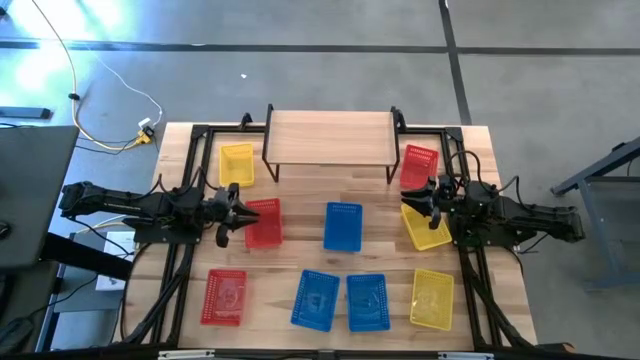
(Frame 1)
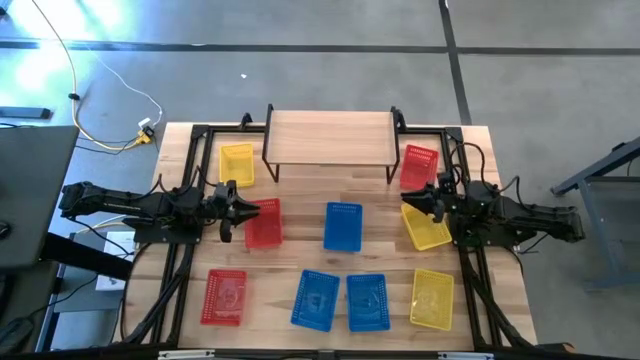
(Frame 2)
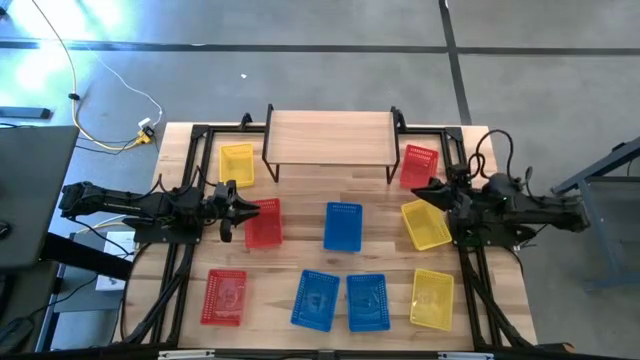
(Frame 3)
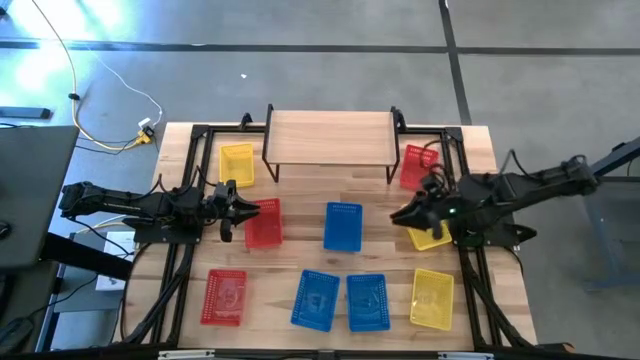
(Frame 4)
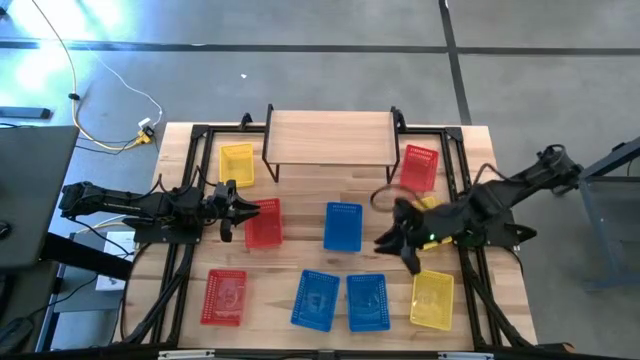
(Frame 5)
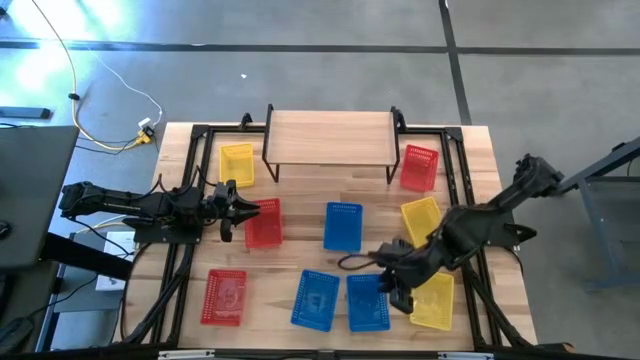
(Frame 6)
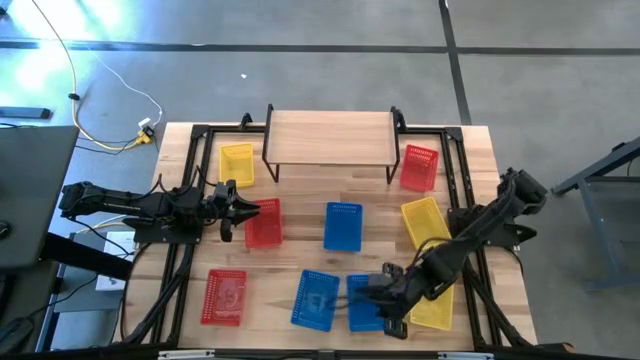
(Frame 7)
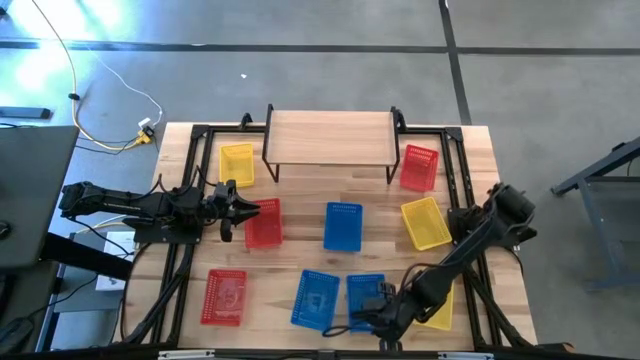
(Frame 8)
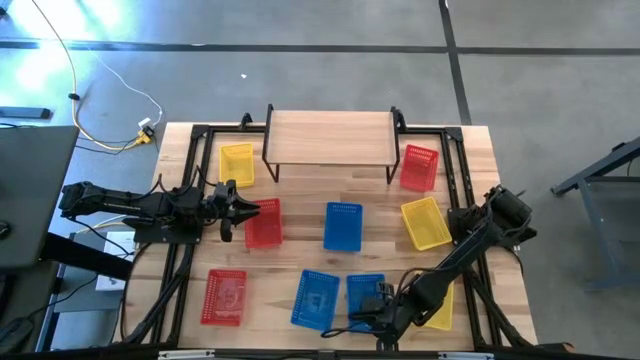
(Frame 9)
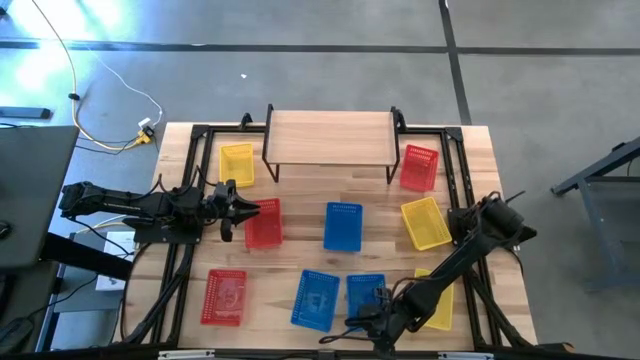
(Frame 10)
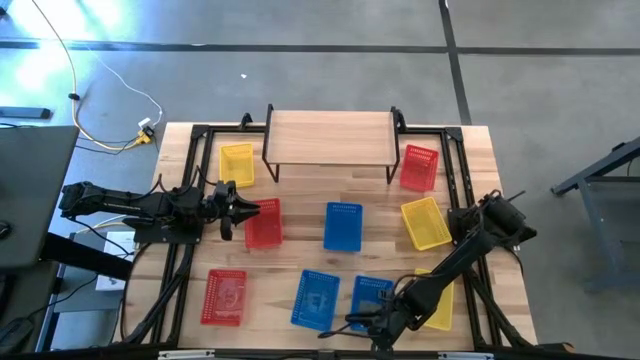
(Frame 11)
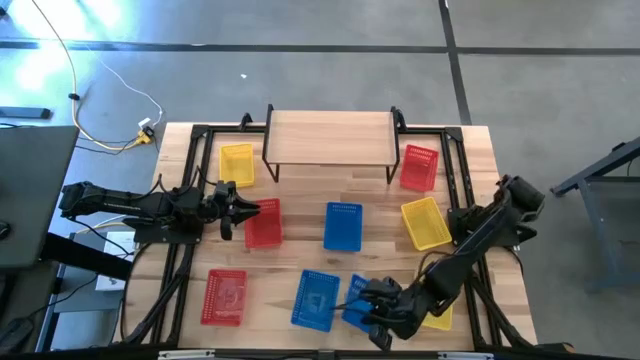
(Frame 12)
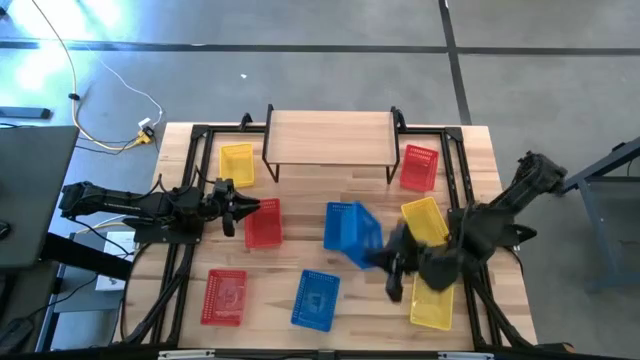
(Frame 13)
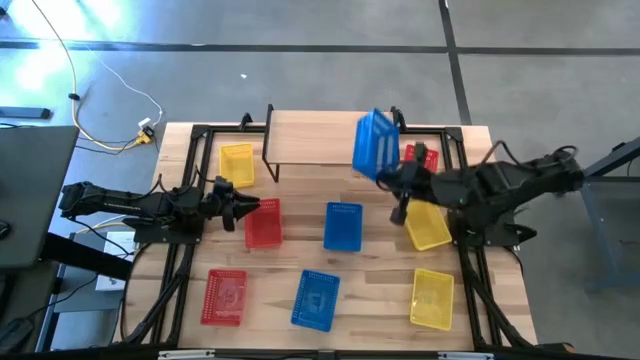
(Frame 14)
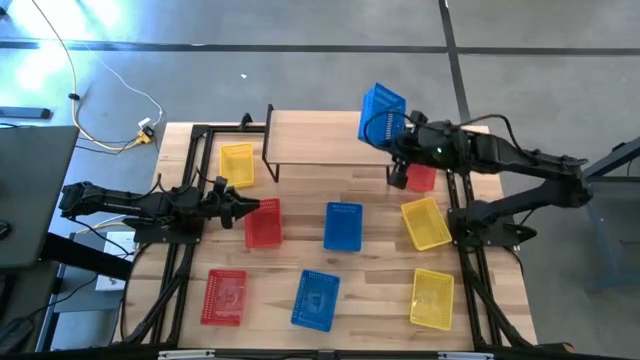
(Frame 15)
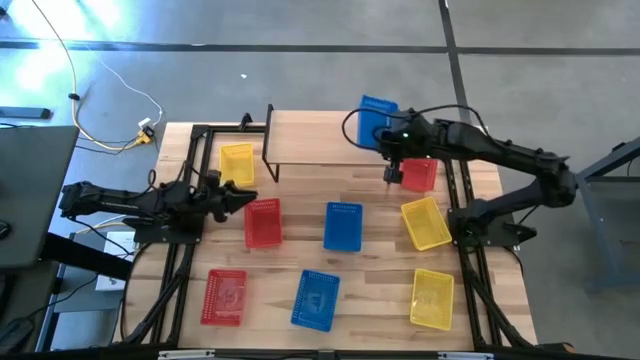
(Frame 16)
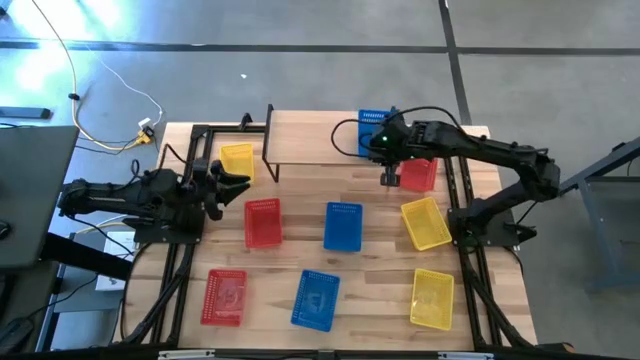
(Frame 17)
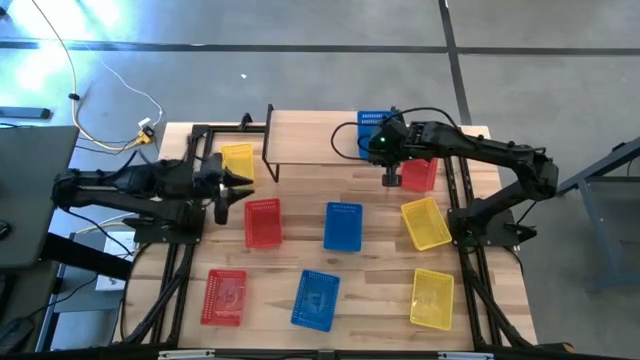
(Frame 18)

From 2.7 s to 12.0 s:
Task: Stack baskets on shelf by color
Put the bottom right blue basket on the shelf

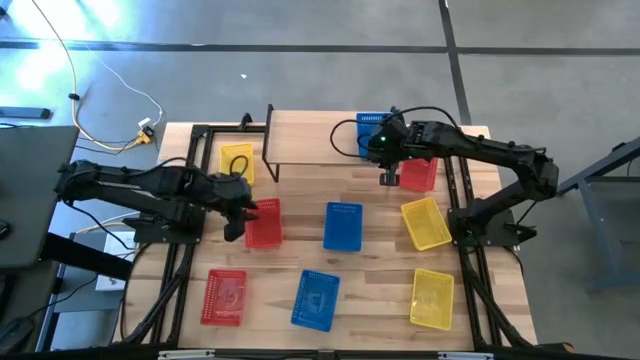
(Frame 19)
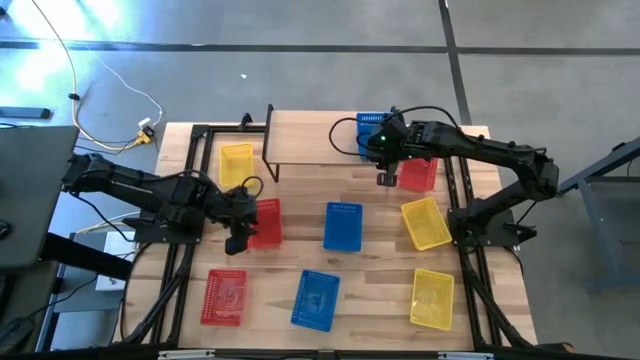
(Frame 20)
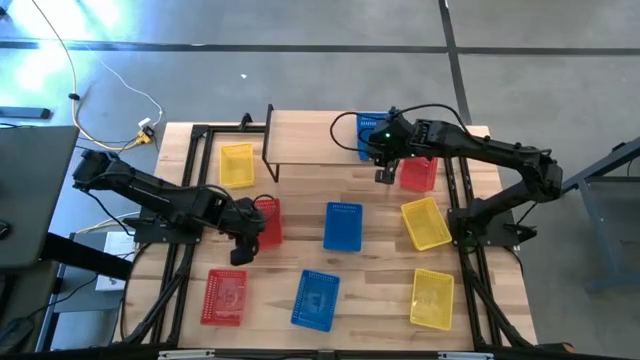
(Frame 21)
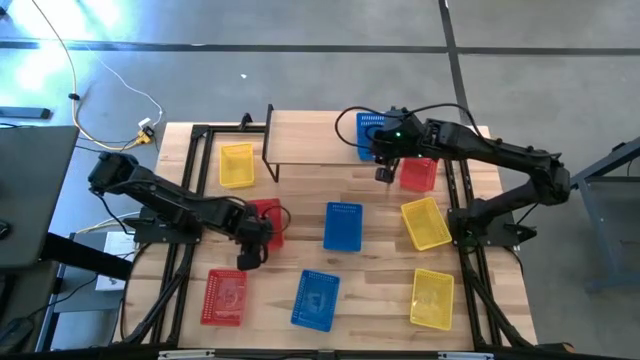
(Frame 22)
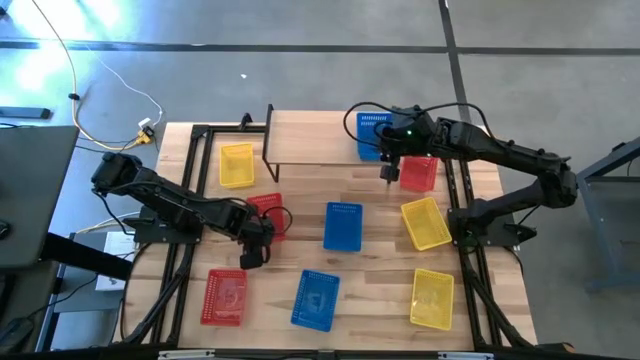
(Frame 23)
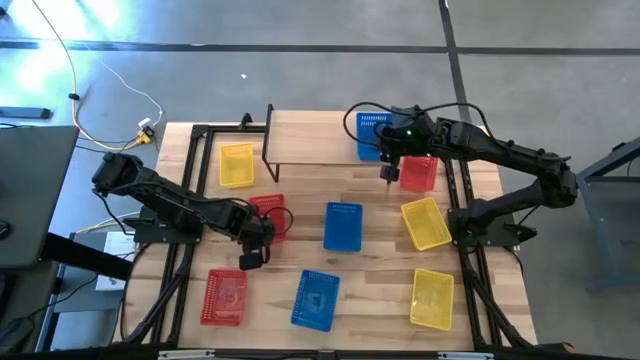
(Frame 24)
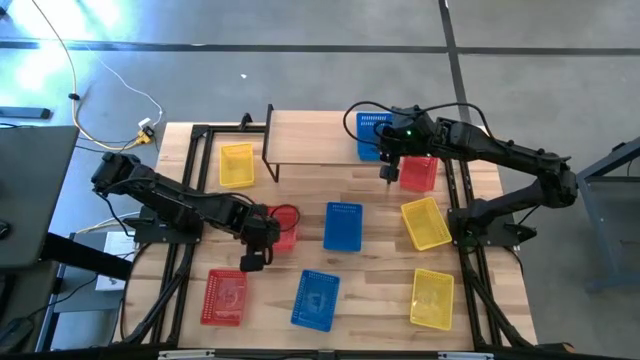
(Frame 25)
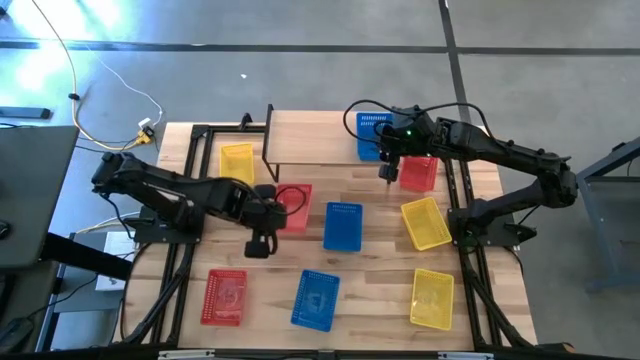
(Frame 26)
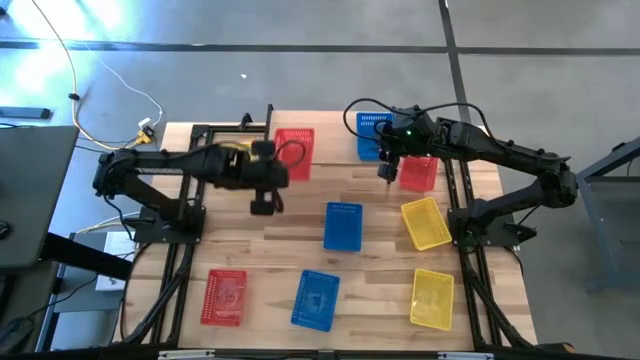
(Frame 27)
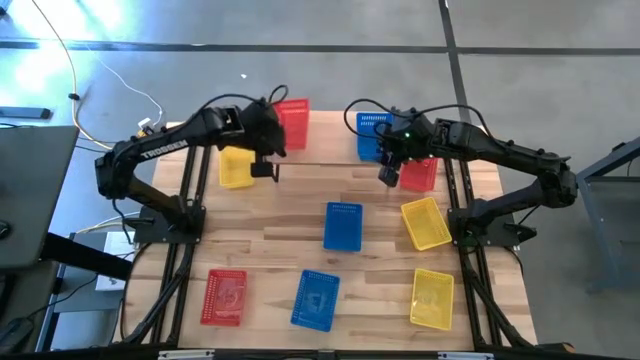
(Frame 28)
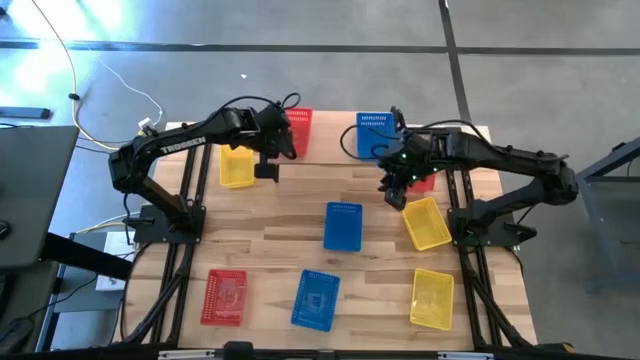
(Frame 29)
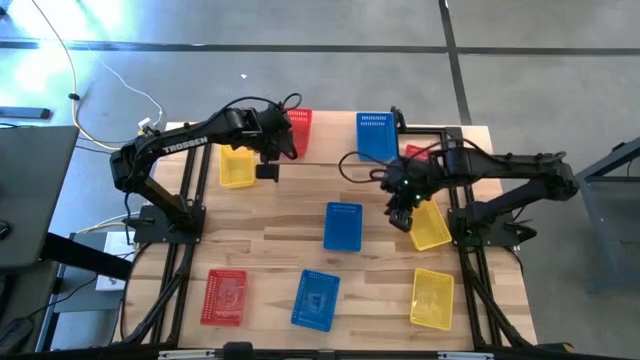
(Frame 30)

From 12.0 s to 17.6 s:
Put the middle left red basket on the shelf

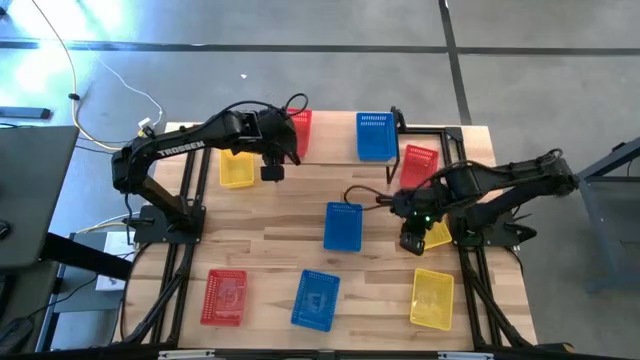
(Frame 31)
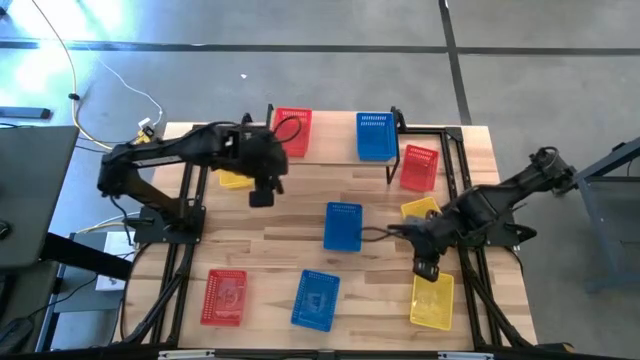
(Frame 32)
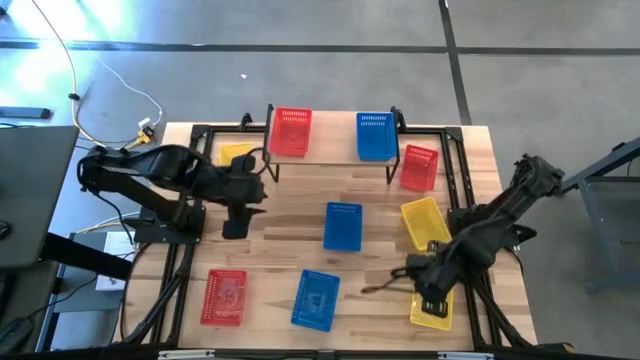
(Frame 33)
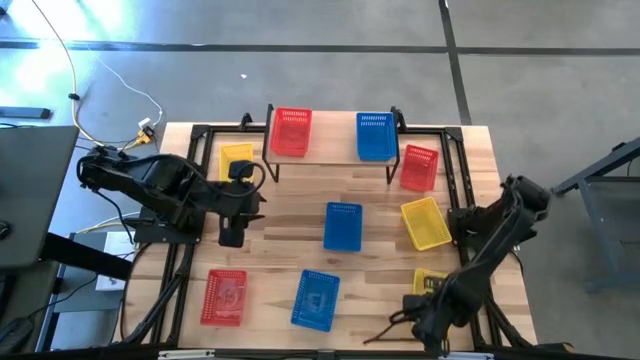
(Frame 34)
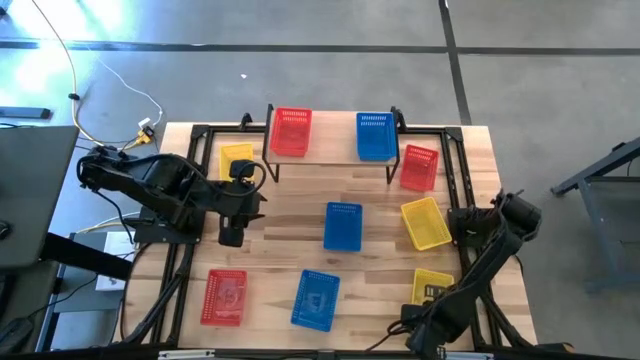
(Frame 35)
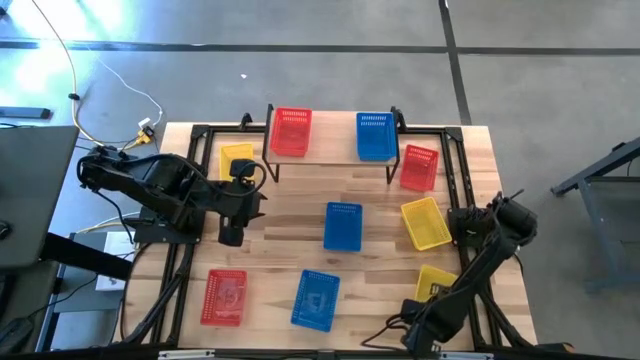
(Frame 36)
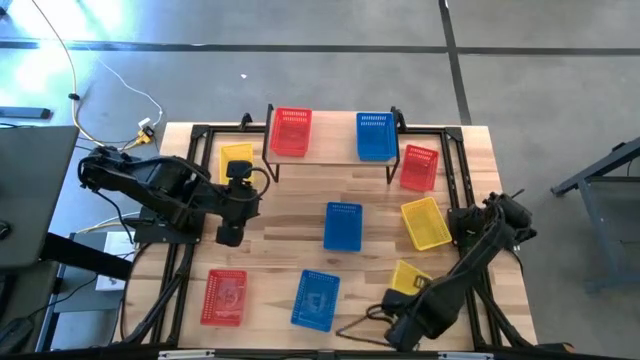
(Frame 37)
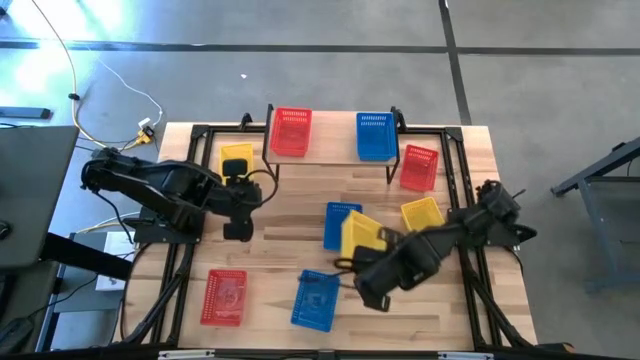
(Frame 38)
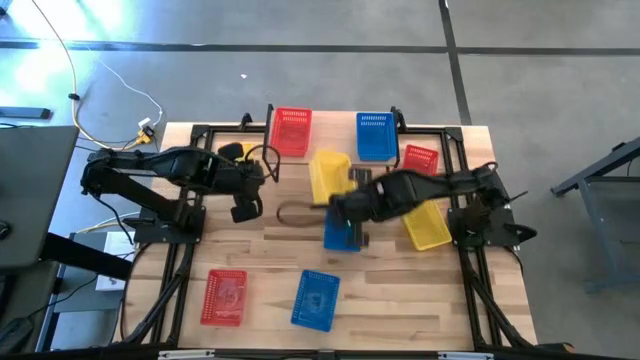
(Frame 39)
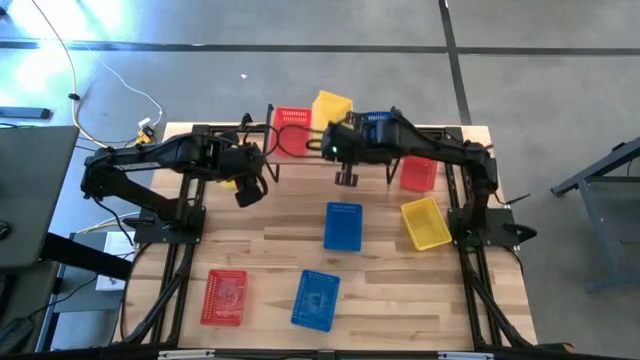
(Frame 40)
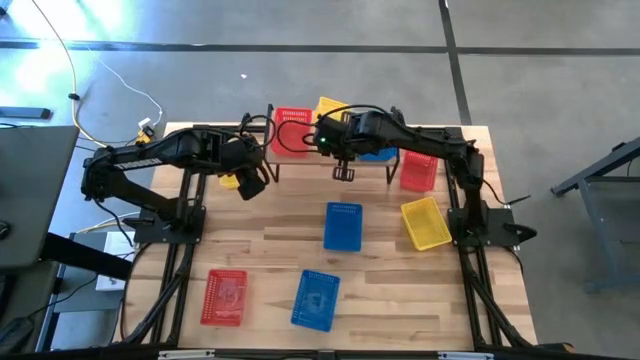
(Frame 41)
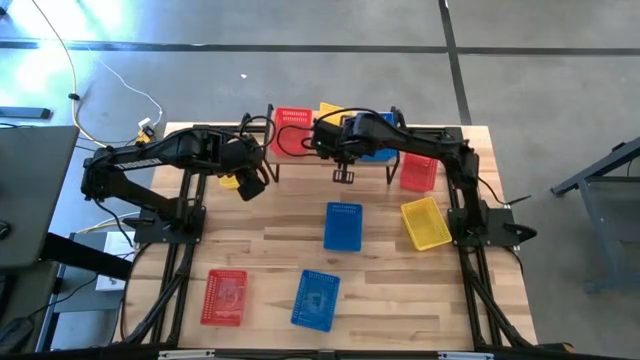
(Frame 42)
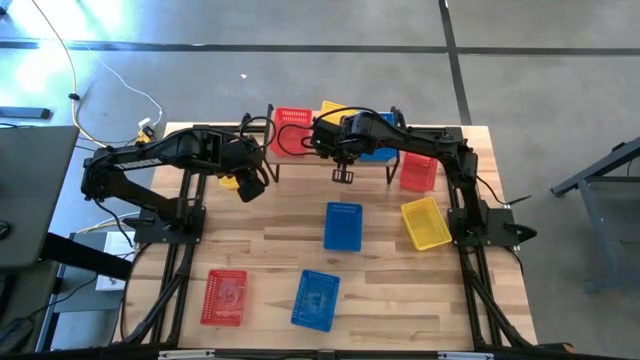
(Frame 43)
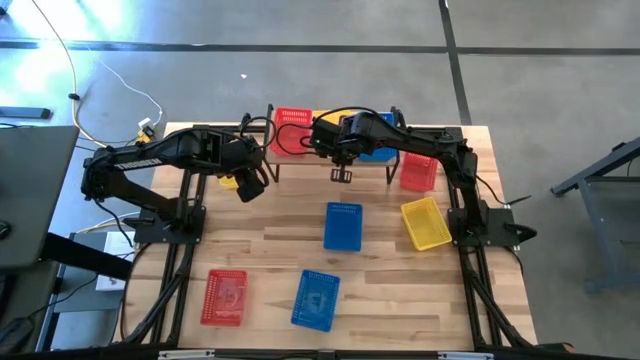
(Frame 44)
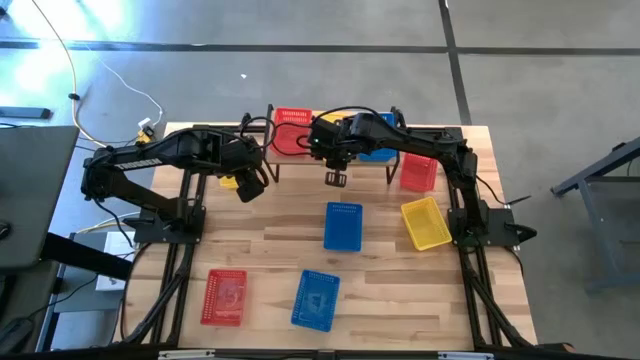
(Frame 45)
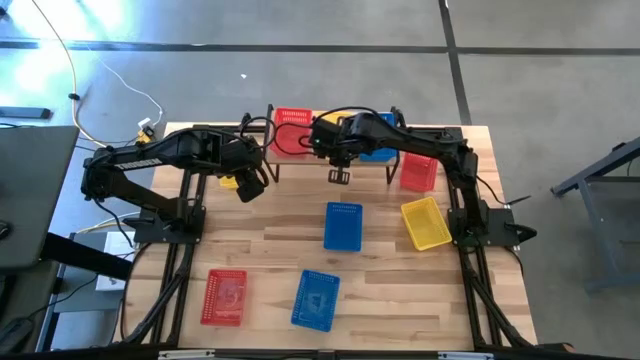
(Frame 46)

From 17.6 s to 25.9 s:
Put the bottom right yellow basket on the shelf
